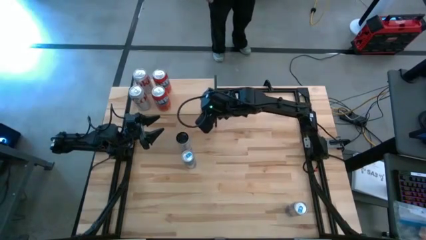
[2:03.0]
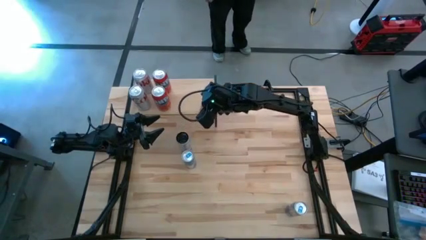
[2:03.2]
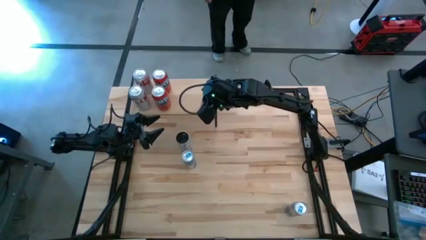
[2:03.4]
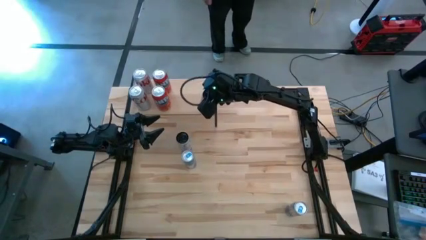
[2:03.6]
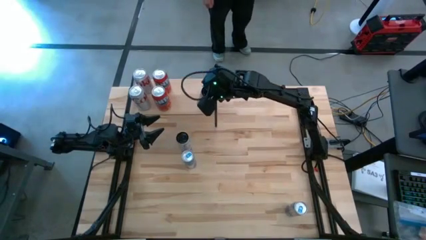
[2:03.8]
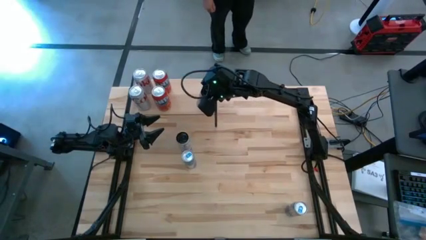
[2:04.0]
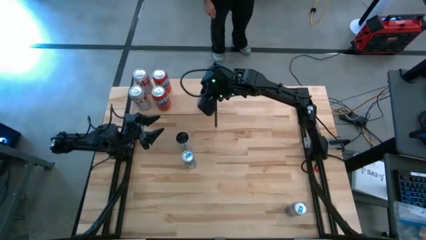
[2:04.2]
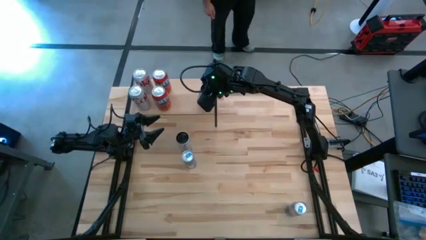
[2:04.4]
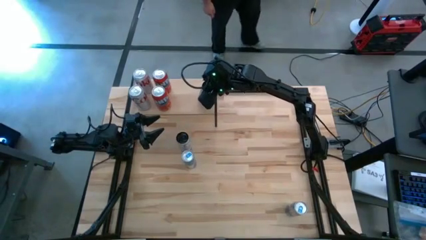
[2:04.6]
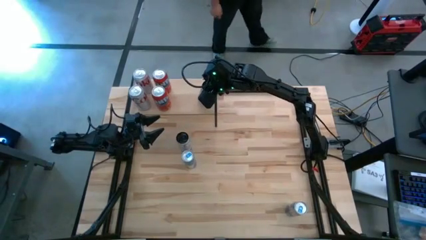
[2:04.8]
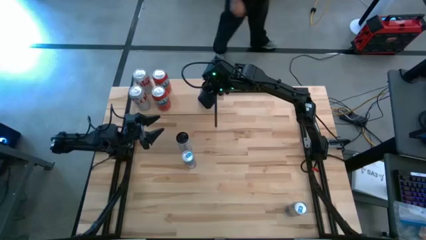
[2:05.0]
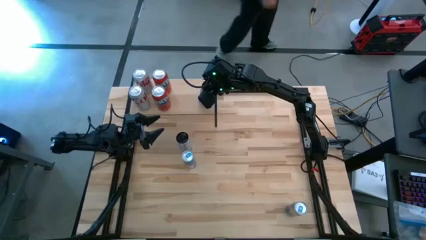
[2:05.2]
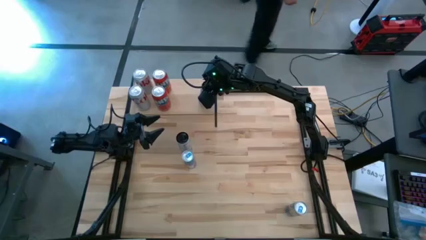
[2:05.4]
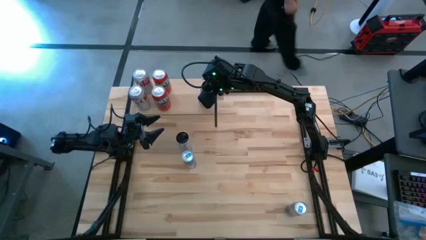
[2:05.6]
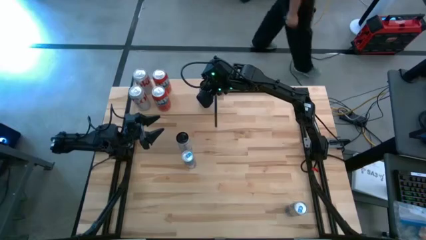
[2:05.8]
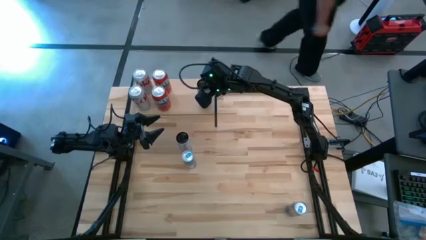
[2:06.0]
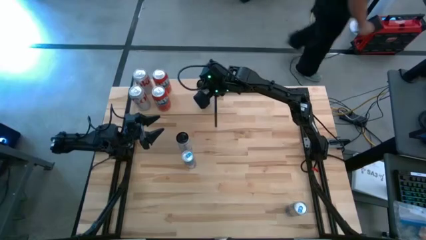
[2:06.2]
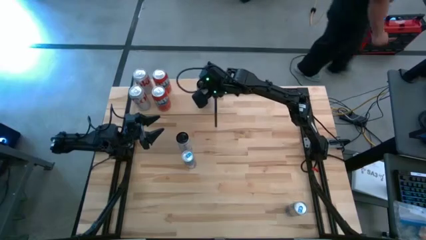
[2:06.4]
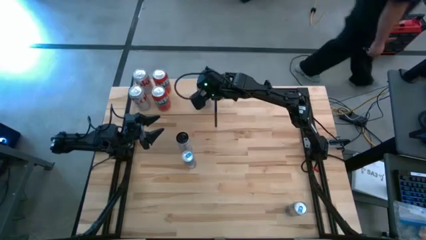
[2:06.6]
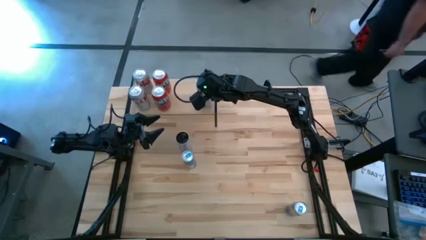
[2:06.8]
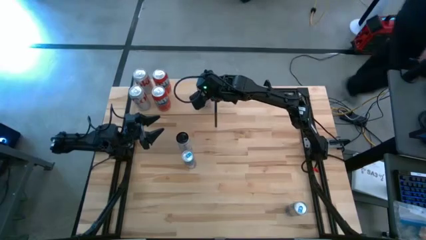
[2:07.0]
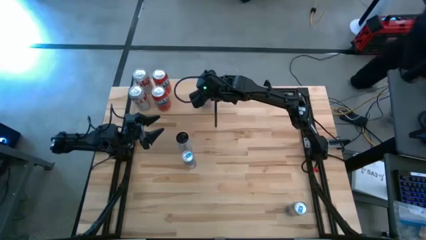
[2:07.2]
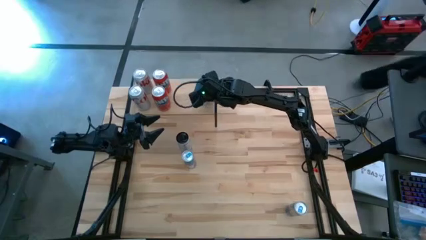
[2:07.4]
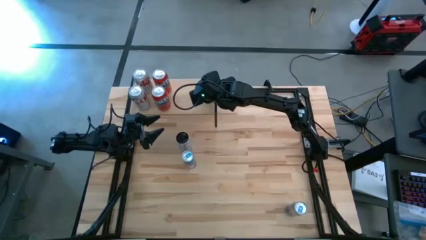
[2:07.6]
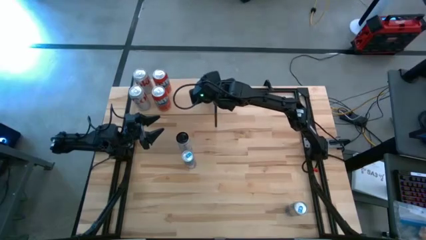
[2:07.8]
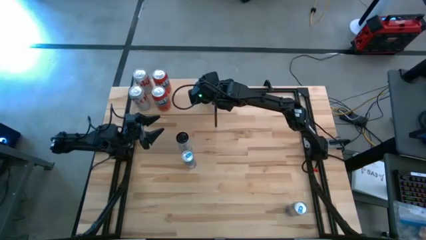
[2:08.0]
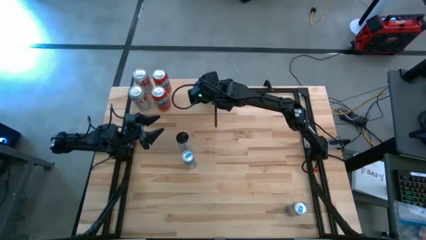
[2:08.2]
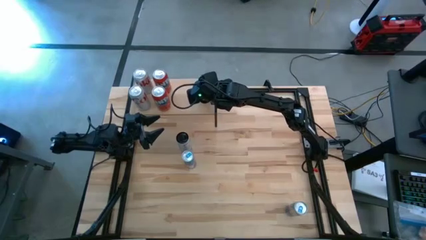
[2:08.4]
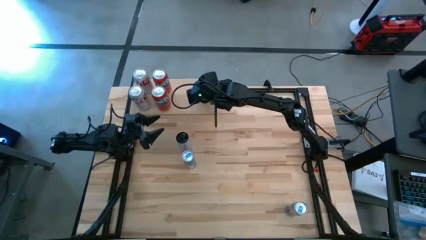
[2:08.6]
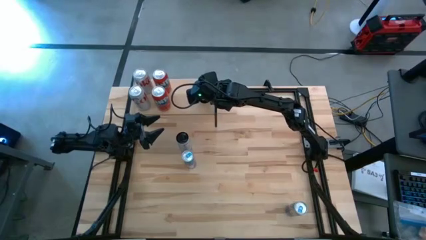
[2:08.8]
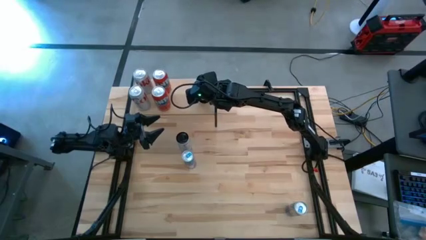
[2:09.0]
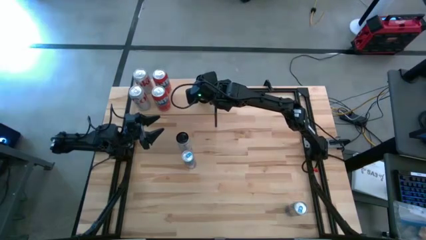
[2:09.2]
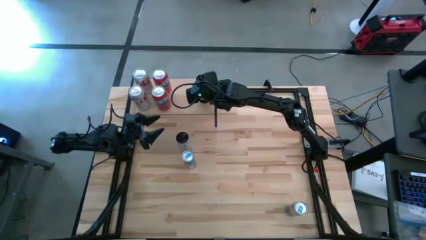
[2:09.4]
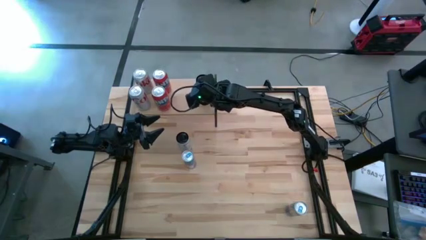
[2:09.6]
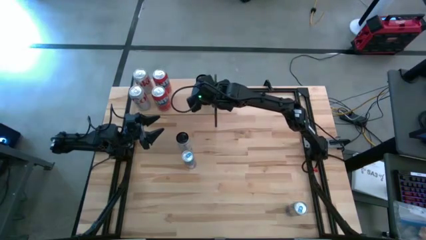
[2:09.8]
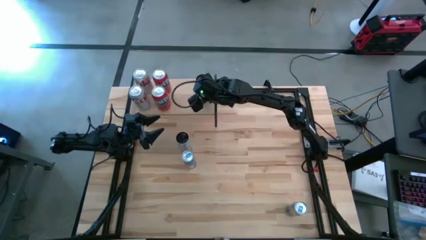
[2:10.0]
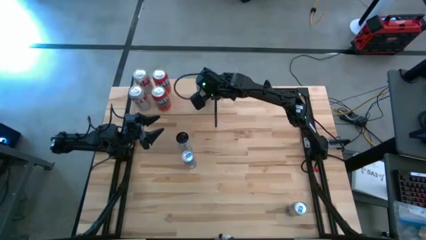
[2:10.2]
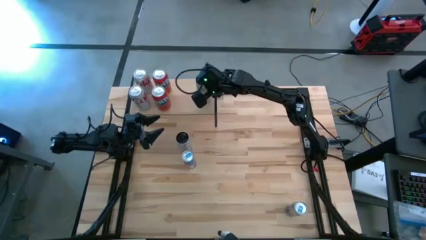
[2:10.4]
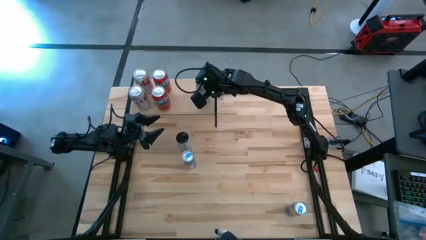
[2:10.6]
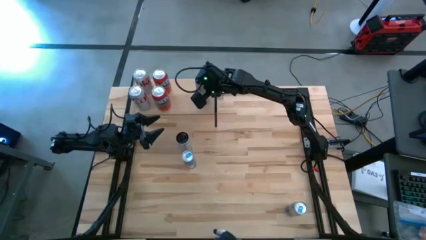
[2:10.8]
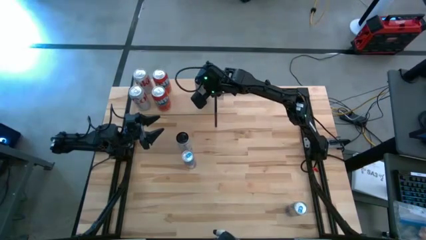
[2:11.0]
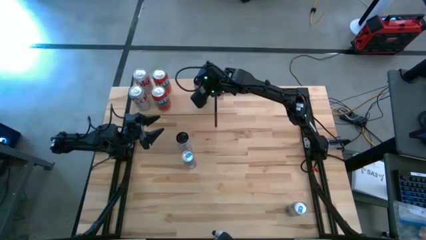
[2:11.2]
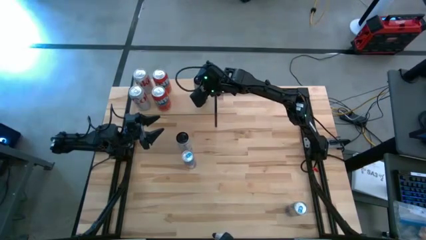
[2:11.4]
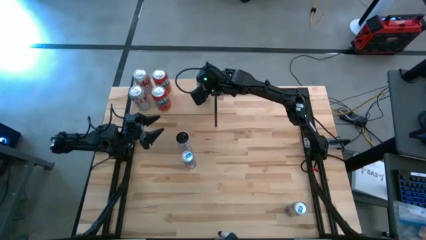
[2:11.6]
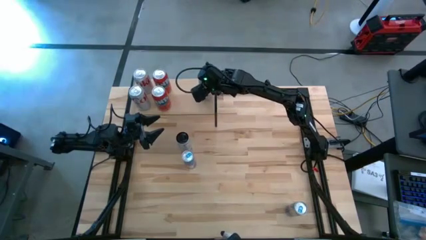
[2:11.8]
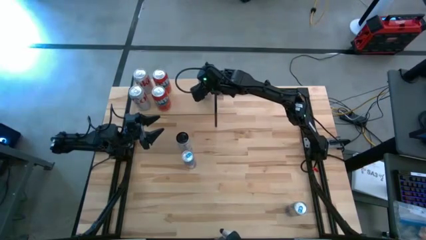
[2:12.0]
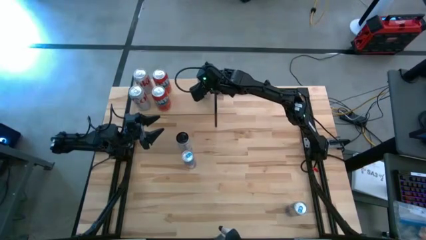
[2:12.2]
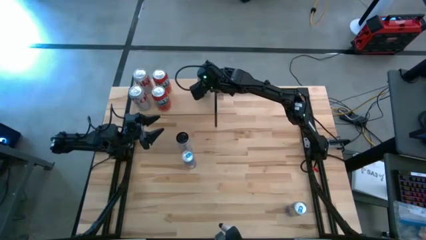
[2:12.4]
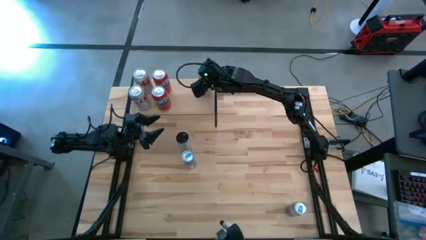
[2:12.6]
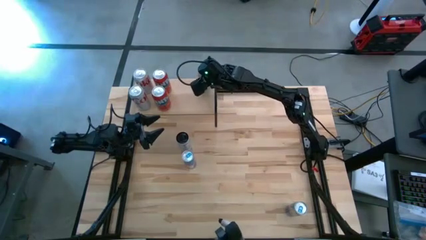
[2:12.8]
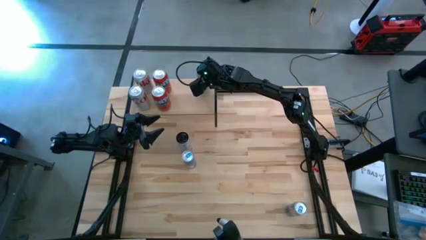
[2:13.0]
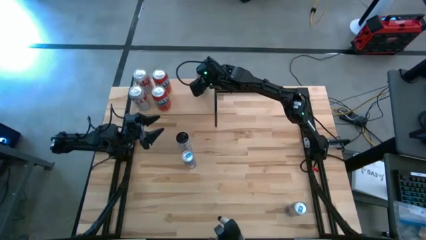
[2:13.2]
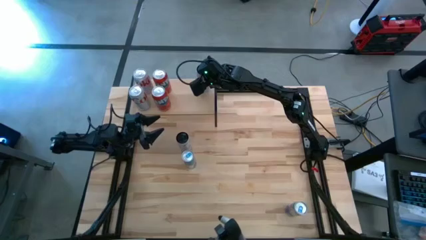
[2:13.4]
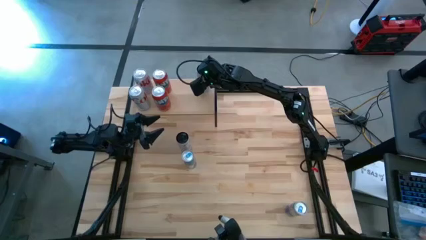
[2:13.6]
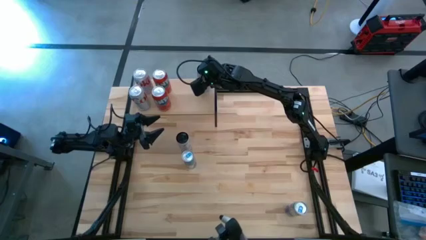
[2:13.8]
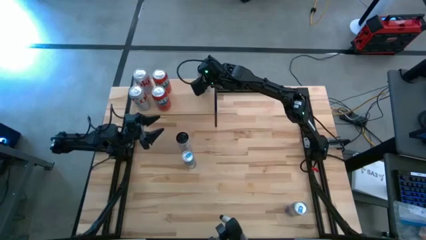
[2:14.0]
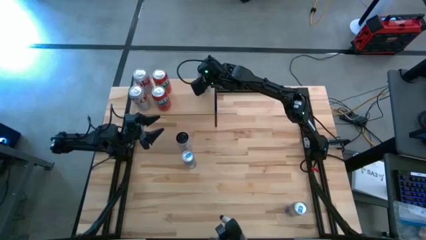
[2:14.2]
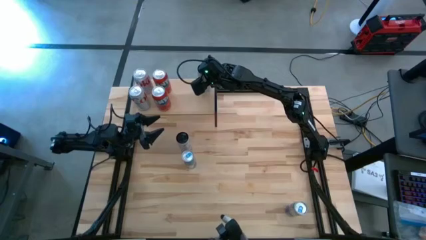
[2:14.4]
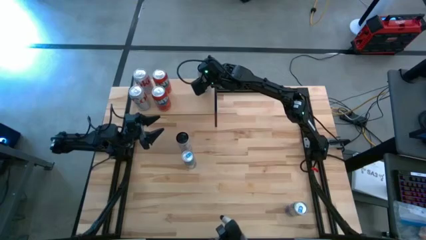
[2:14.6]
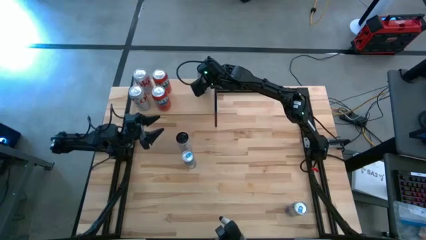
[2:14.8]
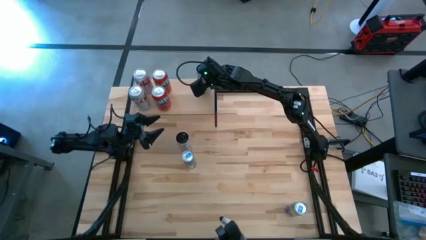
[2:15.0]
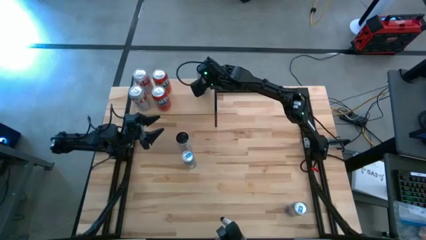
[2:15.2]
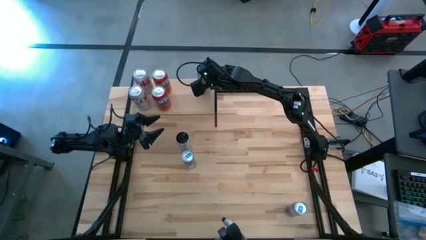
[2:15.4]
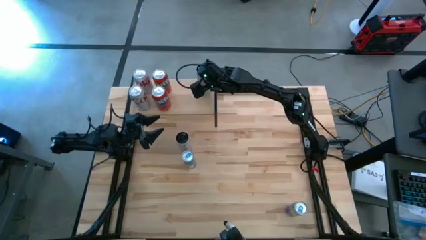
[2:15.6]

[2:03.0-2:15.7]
Task: Place canned beverage on shelf
Put the right white pink soda can on the shelf

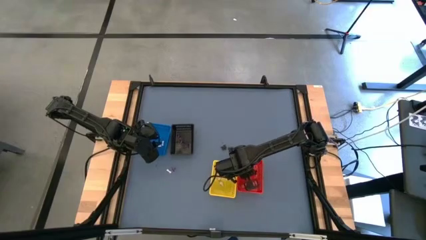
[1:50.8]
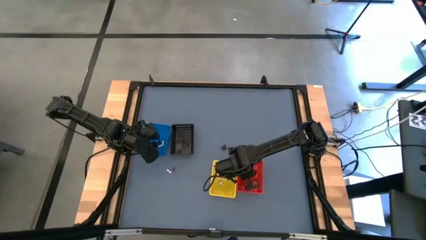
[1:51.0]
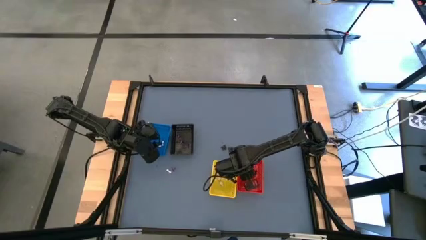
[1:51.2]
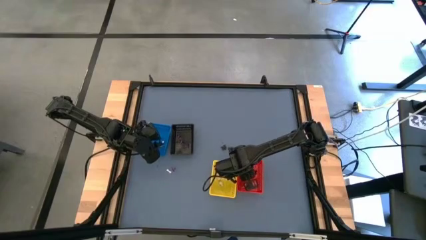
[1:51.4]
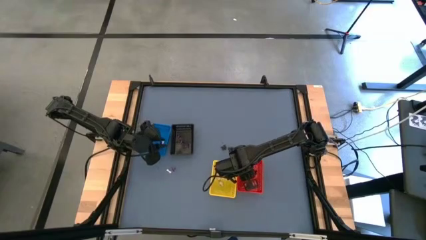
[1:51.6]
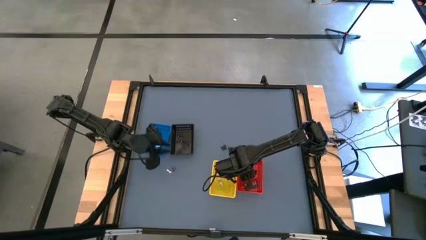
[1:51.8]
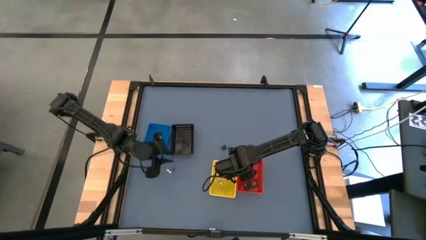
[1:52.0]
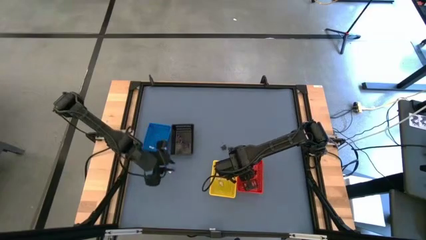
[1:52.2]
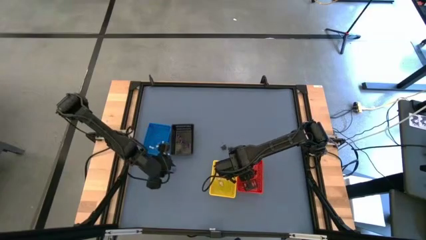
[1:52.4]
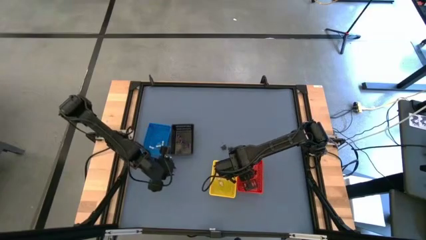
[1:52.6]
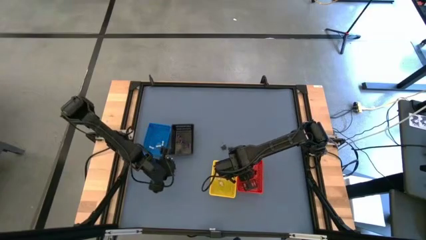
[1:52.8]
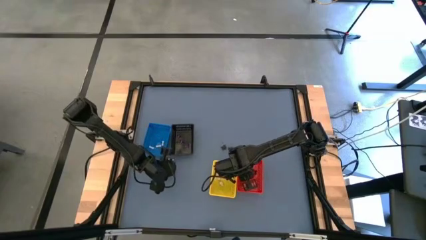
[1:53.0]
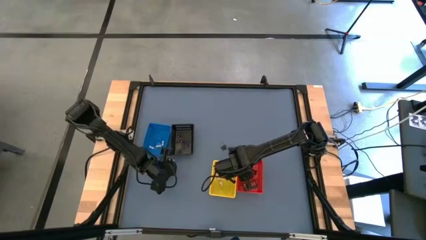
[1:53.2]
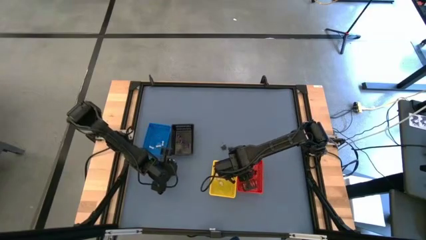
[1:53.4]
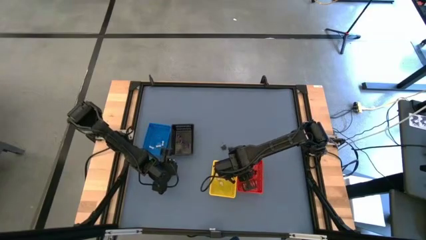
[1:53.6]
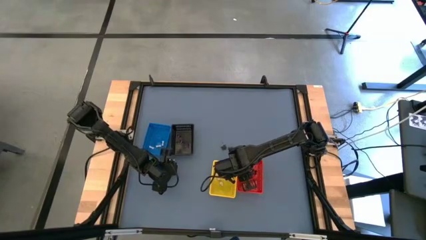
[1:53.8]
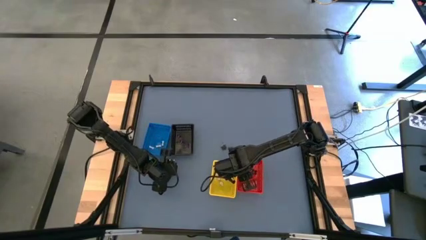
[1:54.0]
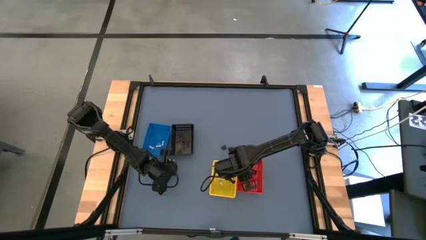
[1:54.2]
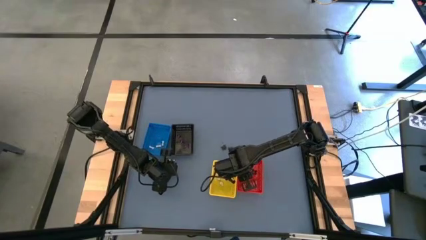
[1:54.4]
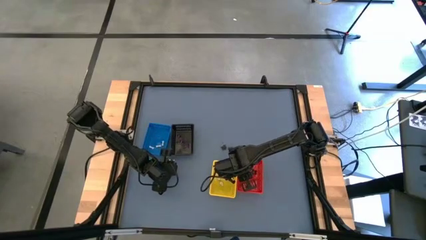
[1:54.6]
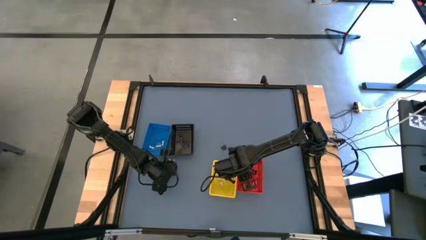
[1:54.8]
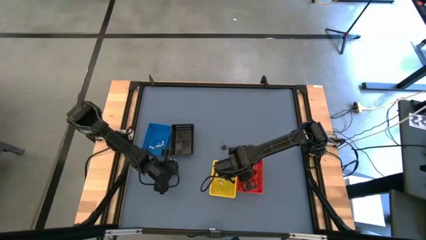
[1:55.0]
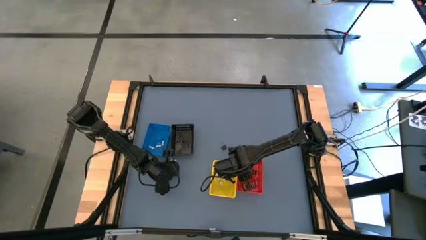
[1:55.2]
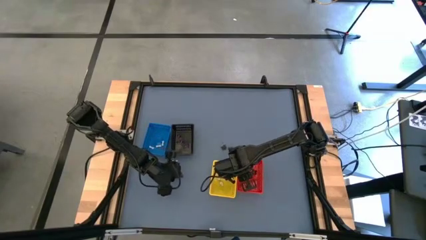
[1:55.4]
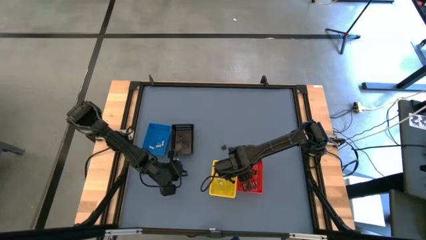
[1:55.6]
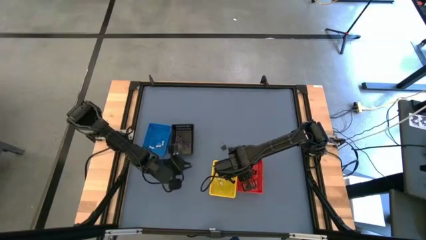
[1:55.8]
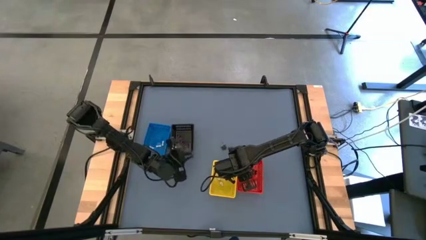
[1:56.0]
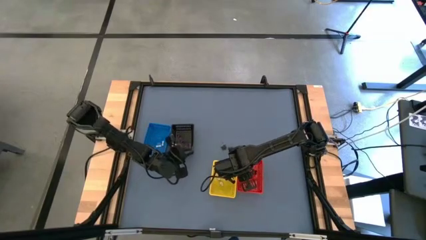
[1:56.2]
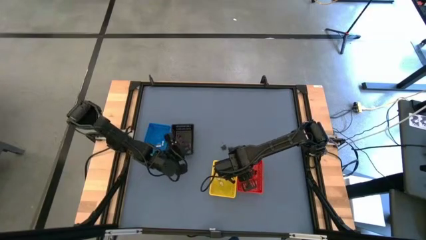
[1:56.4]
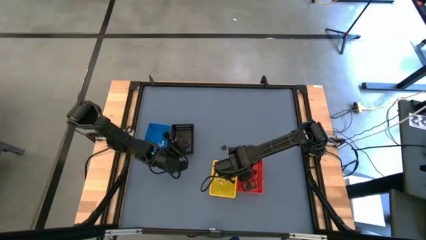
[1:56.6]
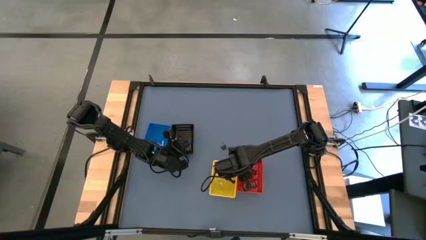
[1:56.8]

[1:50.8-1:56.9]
Task: Sort Halloween decoration
Put the witch hat toy into the black bin
